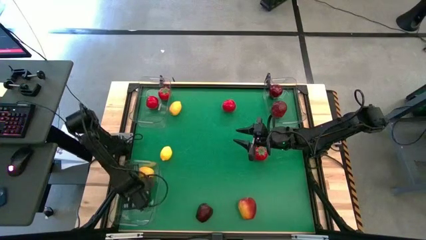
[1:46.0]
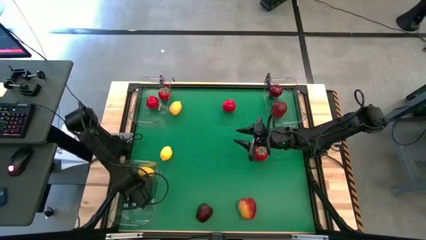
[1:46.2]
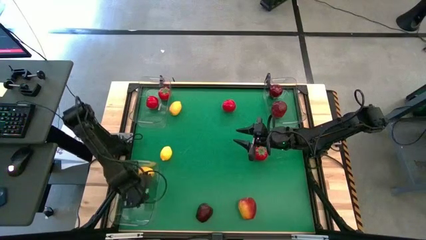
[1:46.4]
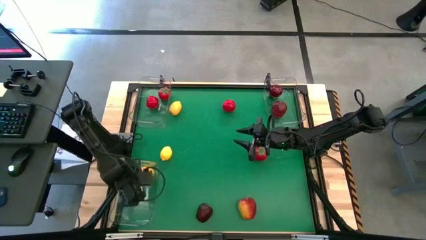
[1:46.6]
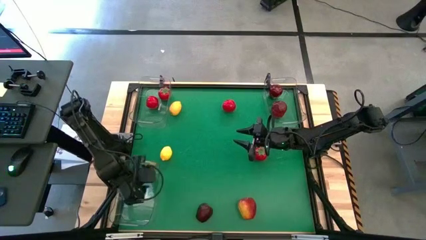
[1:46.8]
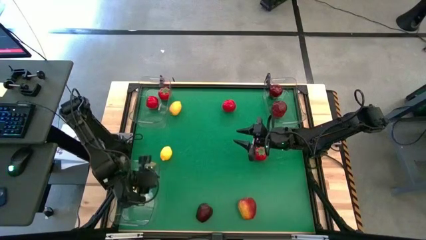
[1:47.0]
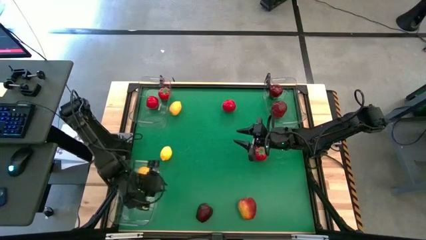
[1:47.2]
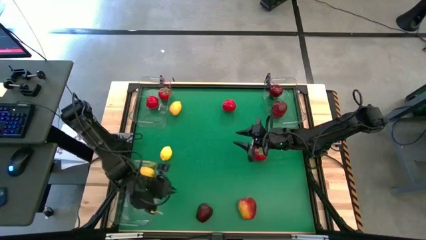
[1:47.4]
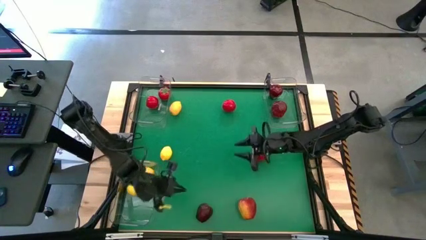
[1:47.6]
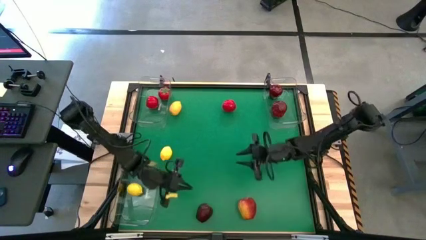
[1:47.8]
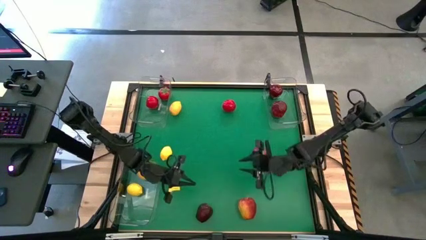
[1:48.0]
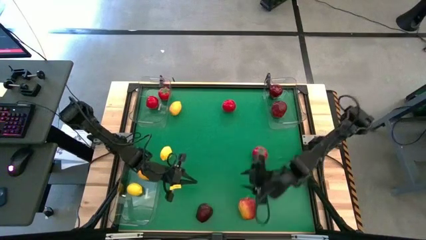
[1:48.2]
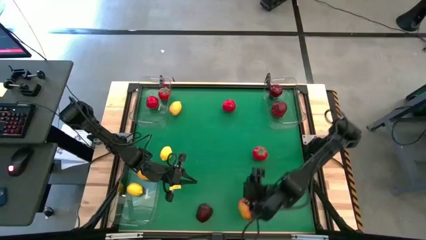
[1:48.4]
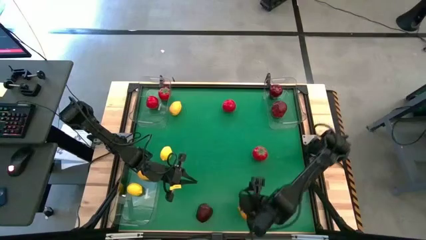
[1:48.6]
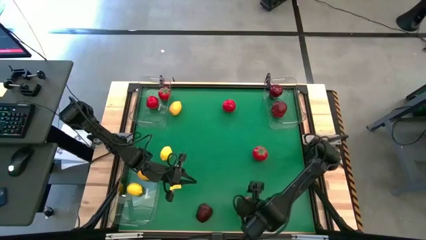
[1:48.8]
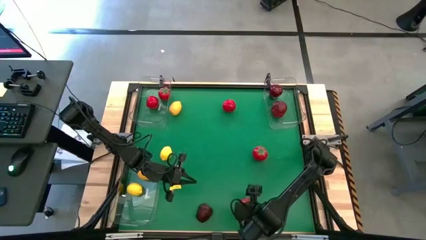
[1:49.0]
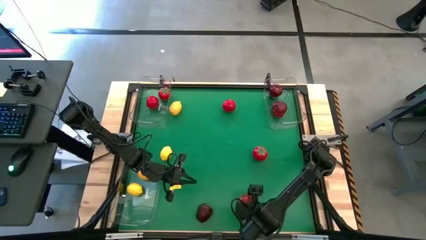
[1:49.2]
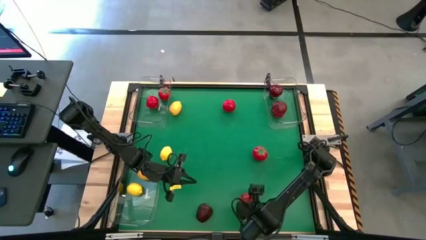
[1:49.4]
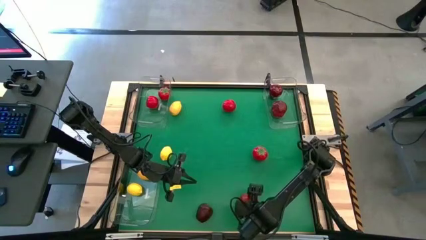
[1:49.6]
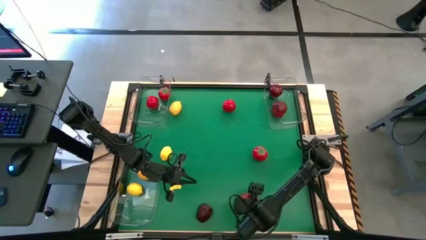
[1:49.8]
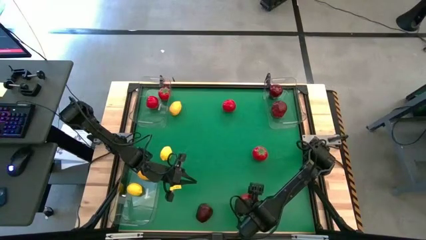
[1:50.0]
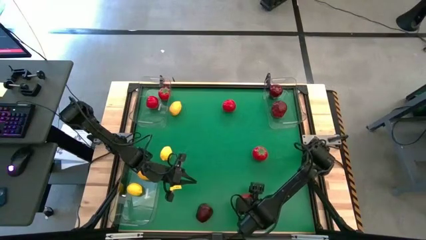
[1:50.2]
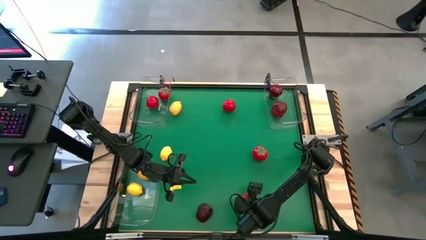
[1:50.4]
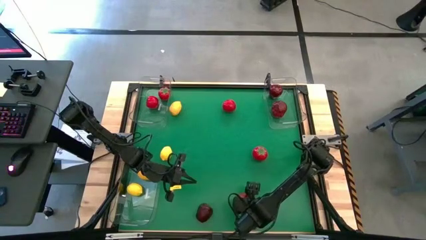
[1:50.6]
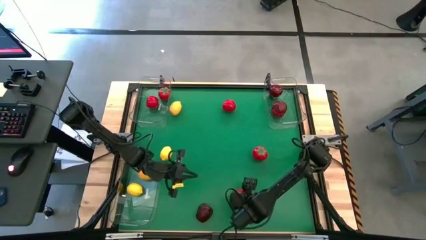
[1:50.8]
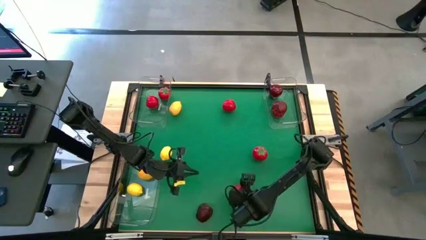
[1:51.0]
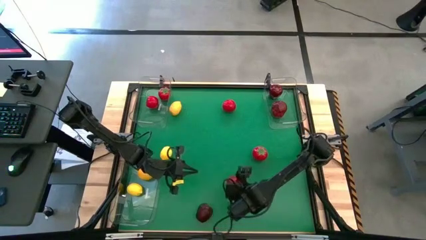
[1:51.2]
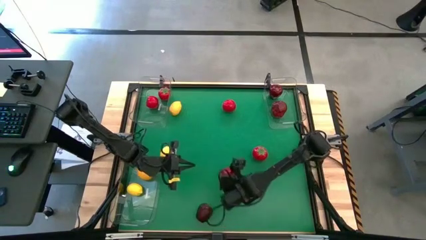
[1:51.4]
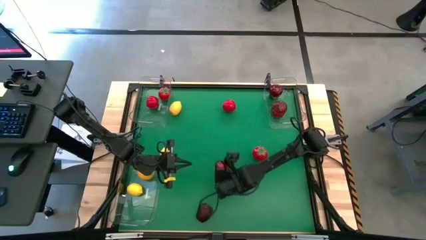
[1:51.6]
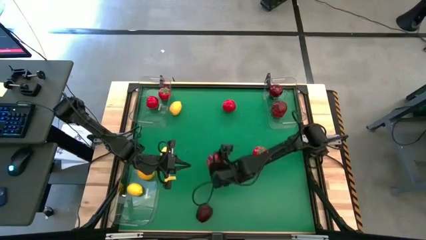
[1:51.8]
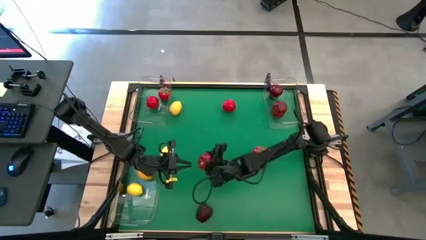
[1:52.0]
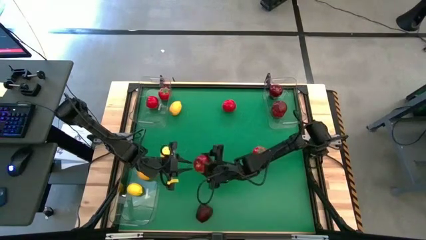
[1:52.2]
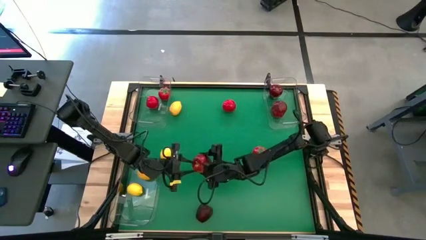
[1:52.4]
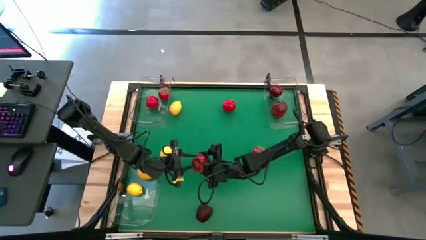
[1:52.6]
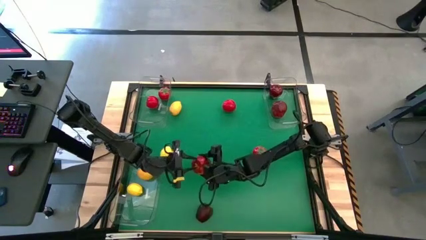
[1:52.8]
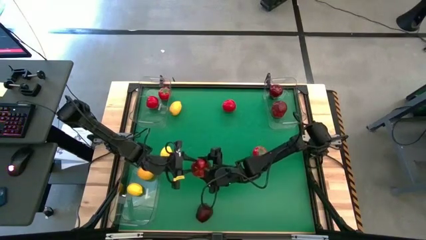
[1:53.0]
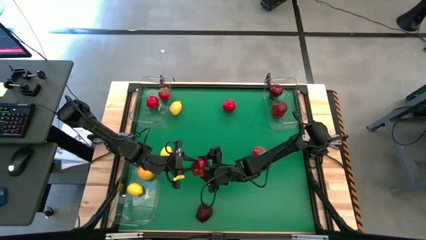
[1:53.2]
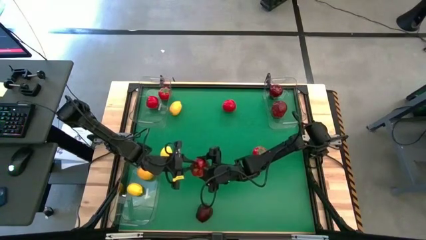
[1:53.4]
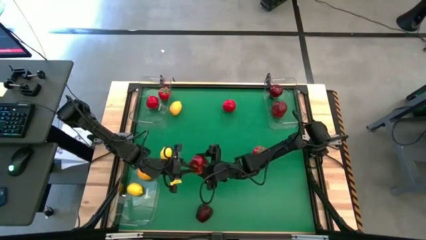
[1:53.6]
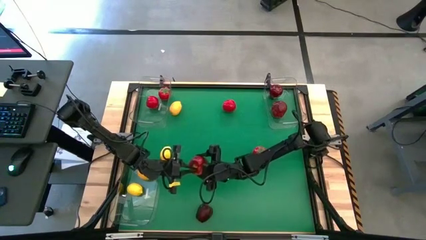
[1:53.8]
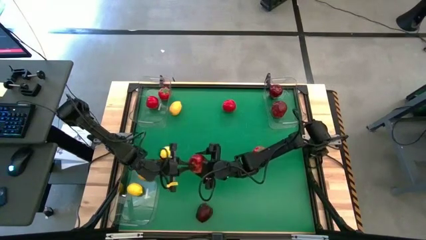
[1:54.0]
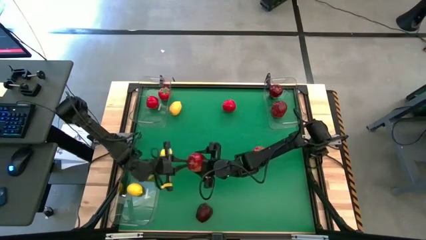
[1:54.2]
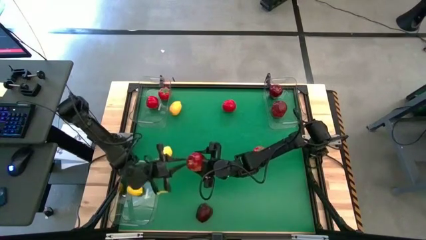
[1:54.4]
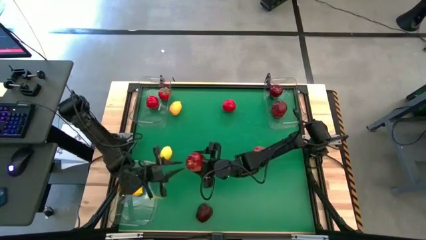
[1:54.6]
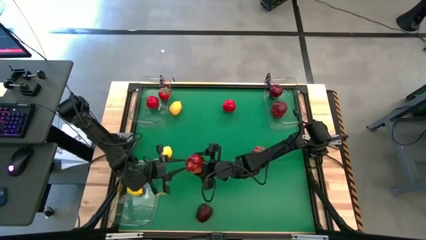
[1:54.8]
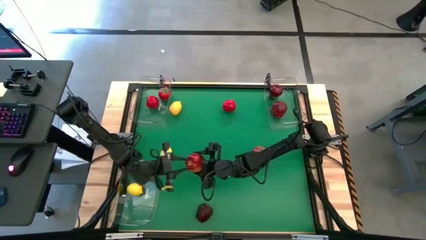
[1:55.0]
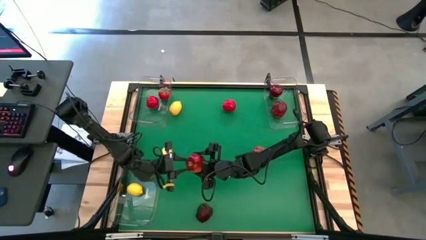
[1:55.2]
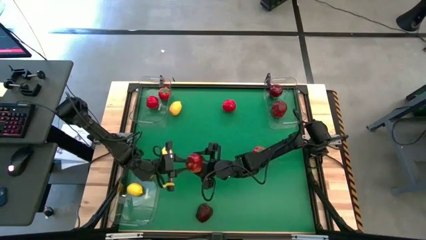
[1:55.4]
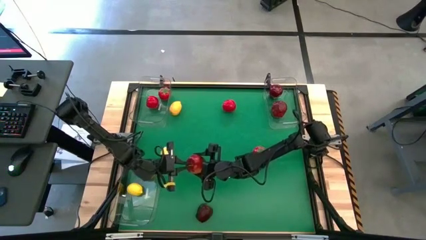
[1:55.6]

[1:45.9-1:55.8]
Task: Sort produce into baskets
Put the apple into the top right bin

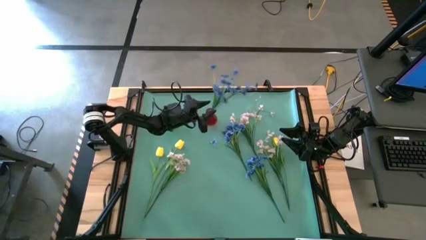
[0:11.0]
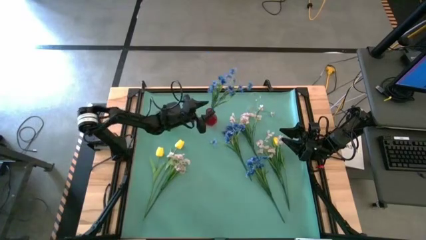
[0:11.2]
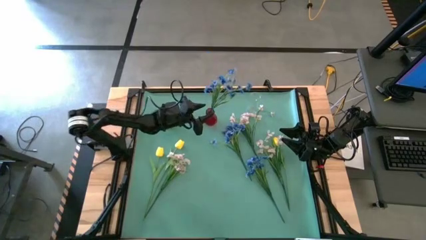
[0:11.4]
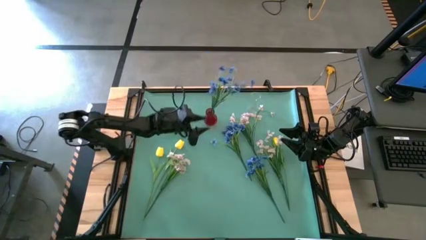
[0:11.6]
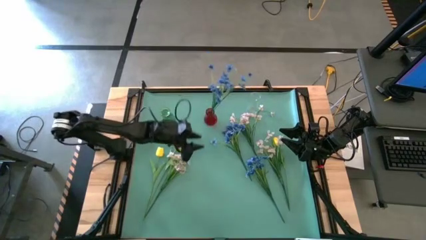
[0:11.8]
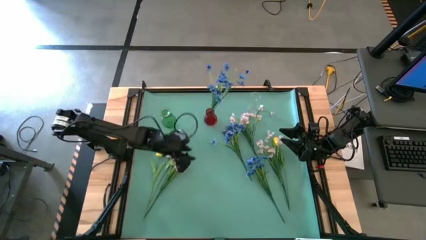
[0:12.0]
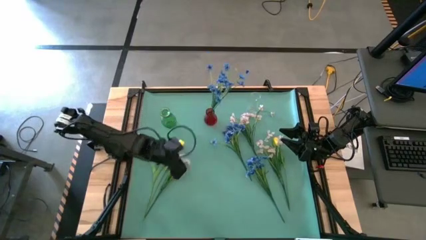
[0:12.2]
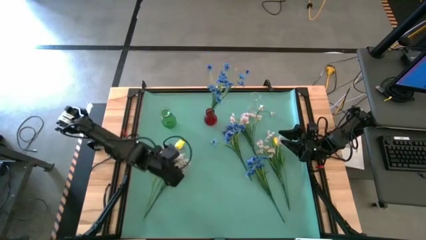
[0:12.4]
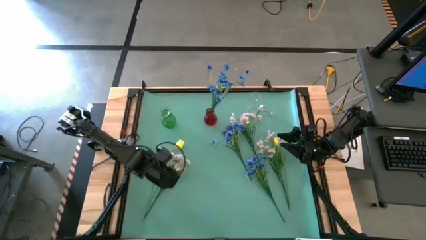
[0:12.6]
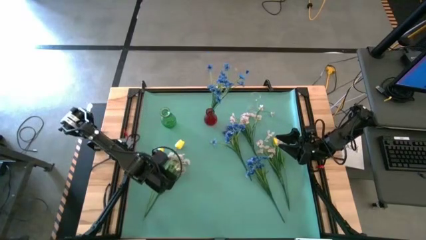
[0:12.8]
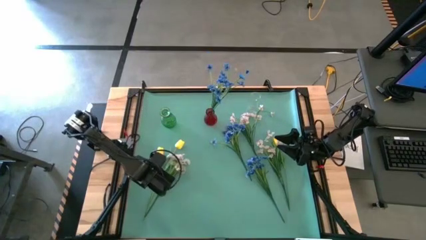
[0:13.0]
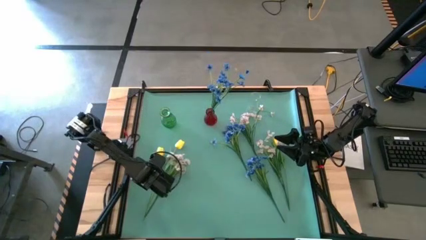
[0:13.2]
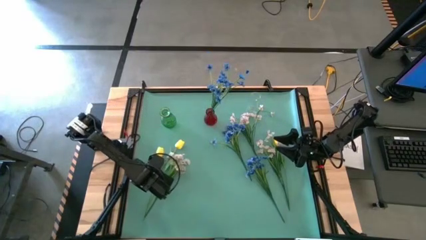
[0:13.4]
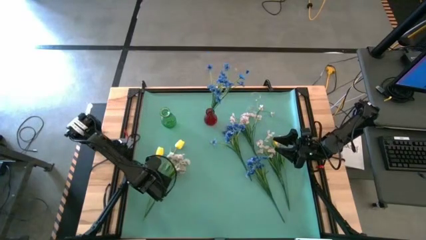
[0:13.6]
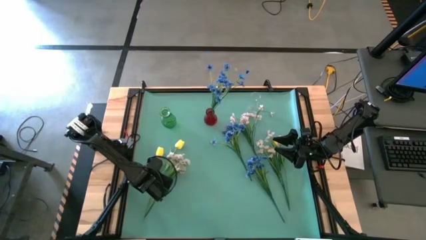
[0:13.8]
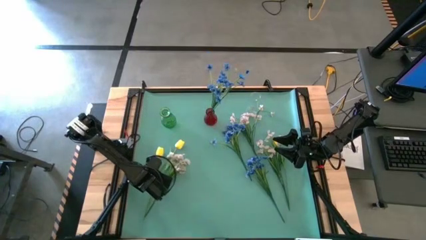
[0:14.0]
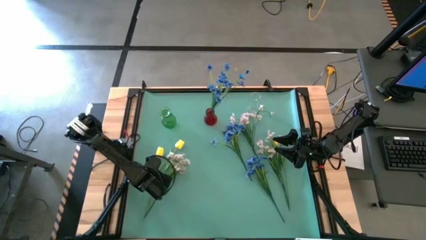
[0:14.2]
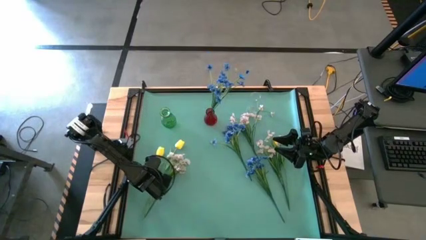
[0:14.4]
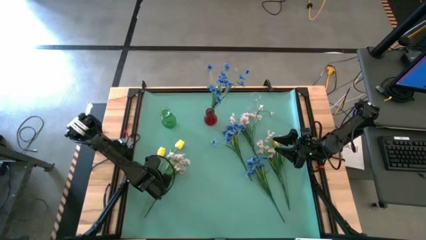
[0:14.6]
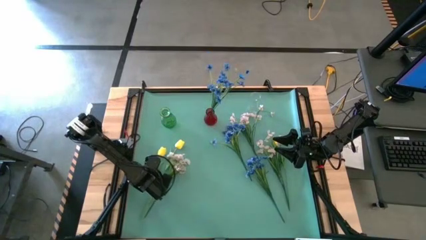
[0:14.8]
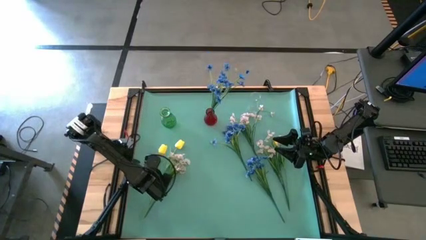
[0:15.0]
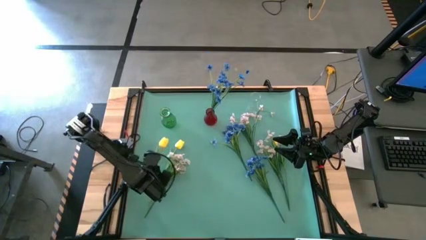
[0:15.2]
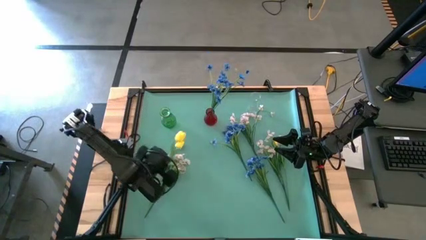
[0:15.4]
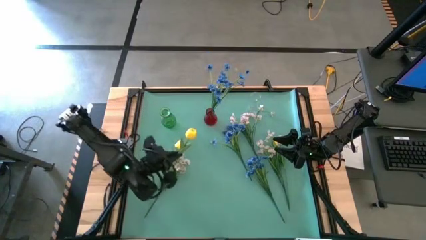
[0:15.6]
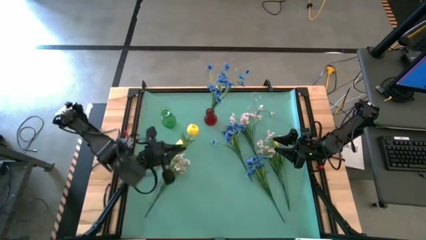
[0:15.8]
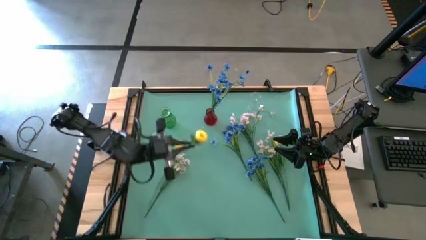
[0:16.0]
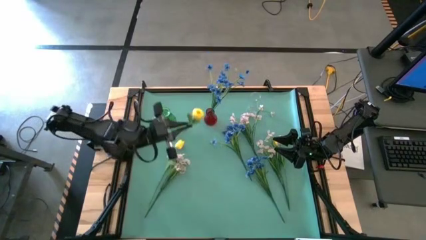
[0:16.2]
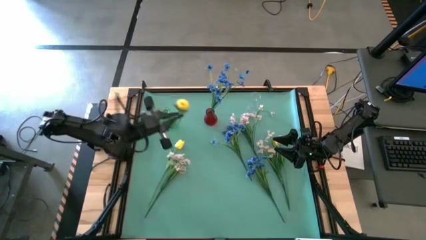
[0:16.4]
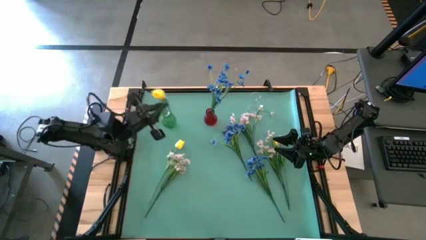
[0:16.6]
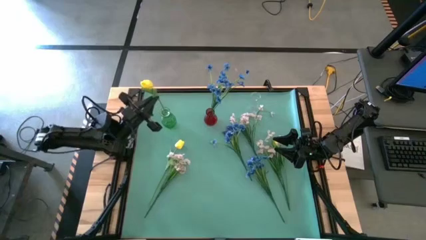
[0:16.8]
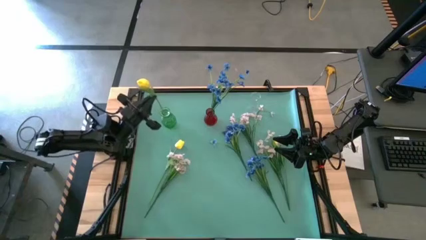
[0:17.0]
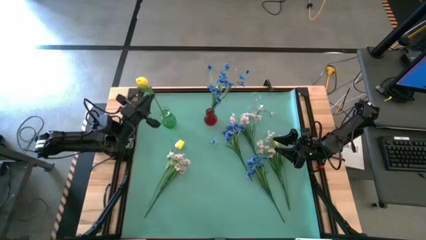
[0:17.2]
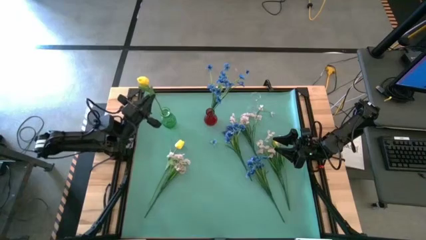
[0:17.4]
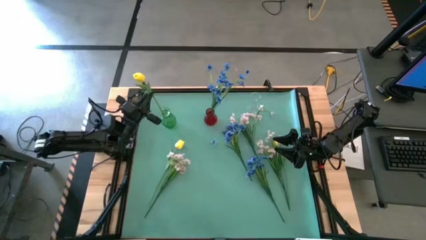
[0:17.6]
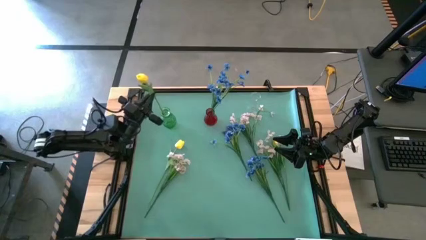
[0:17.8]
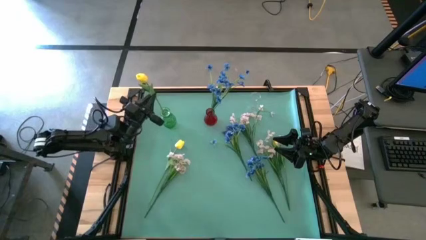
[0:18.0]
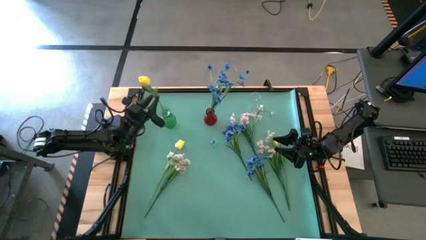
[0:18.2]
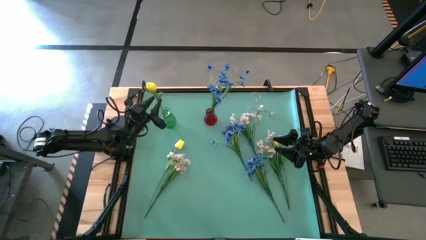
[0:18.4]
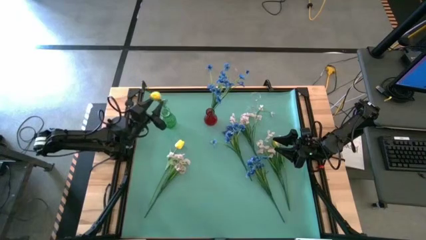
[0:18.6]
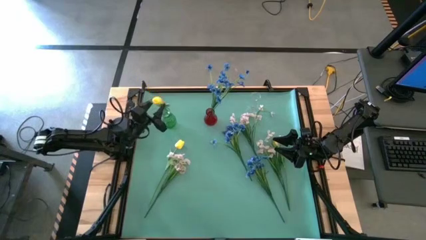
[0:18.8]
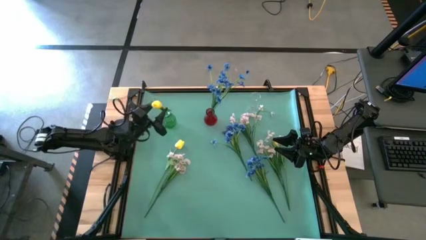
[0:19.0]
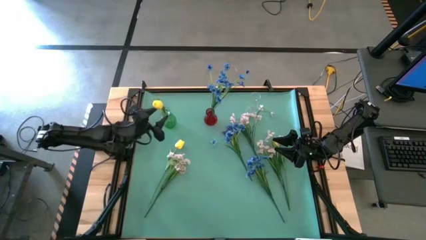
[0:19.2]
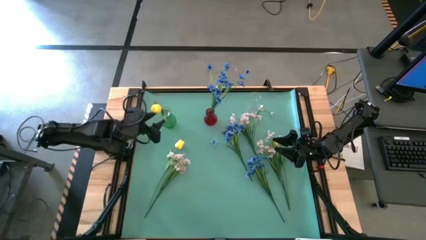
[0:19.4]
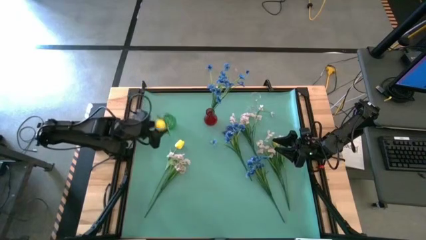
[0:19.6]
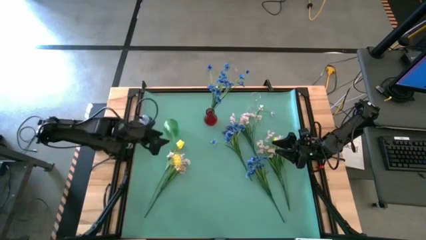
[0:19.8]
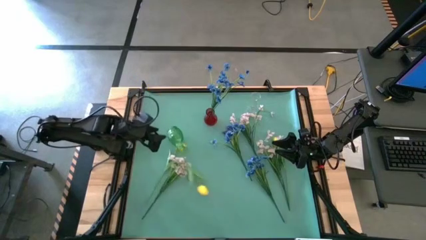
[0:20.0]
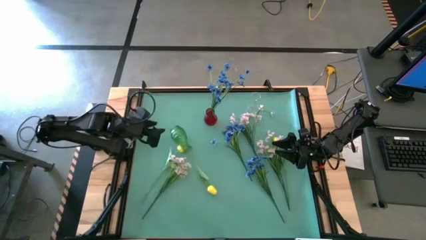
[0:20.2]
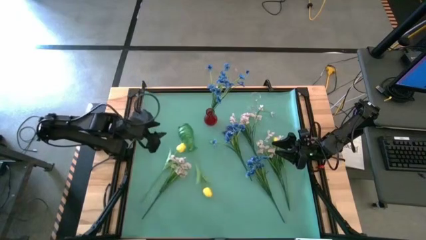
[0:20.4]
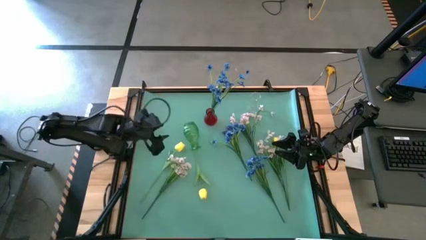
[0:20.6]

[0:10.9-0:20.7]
Task: Sort flowers into vase by color
Put the left yellow flower into the green vase
